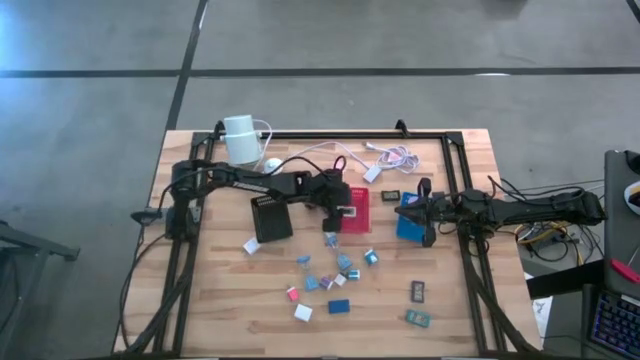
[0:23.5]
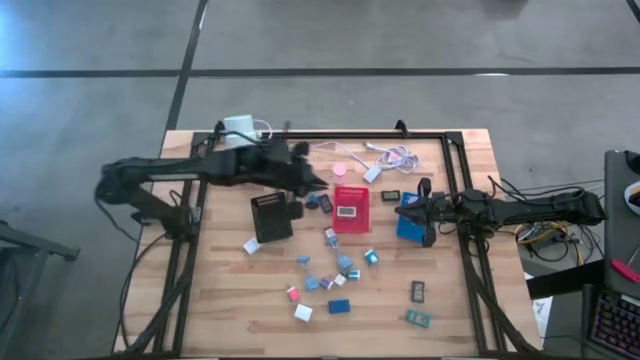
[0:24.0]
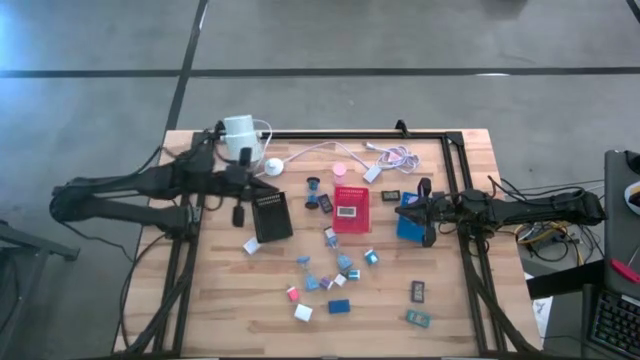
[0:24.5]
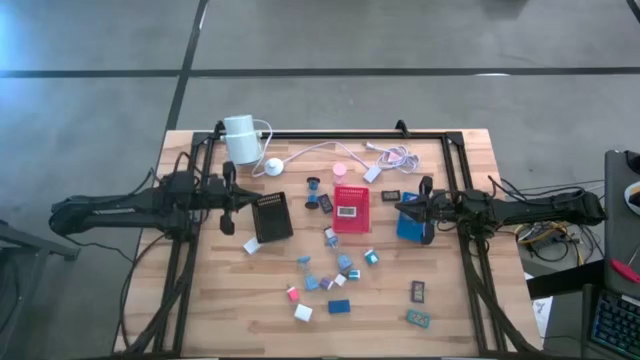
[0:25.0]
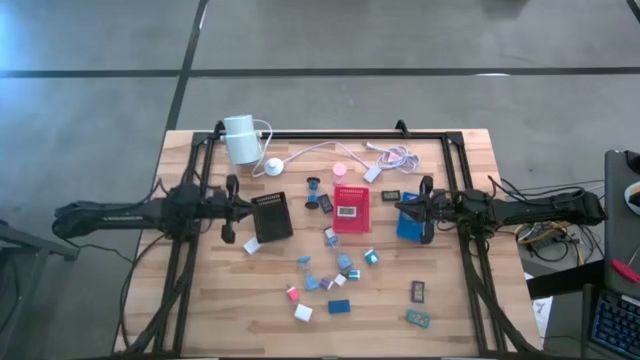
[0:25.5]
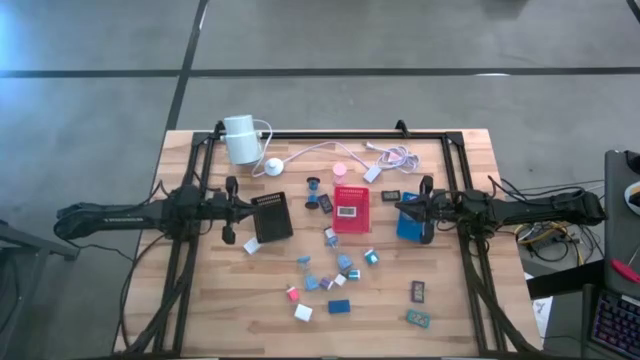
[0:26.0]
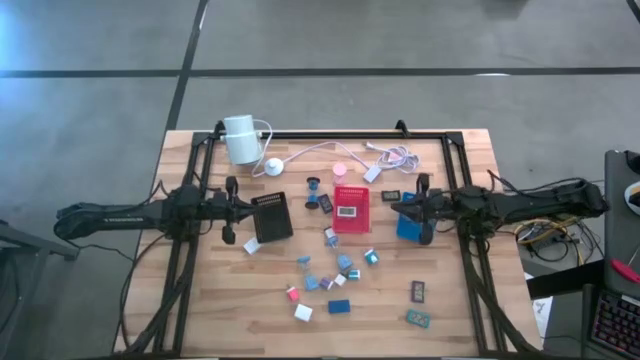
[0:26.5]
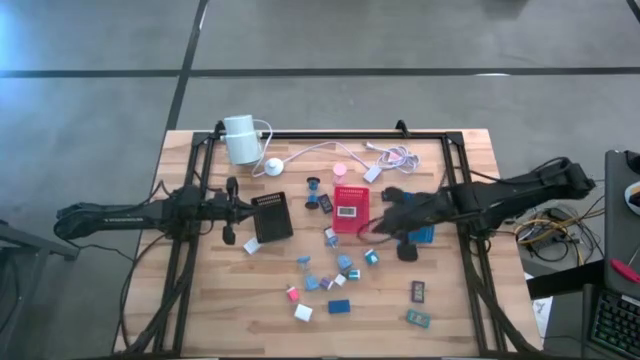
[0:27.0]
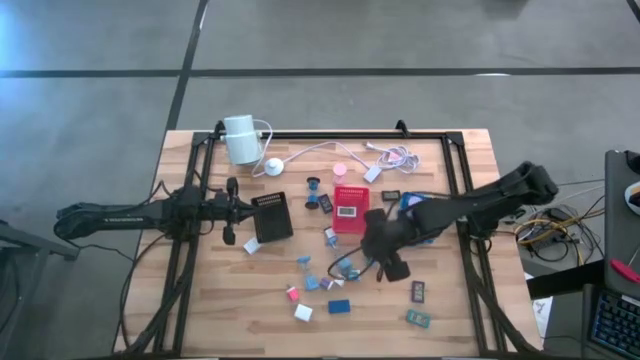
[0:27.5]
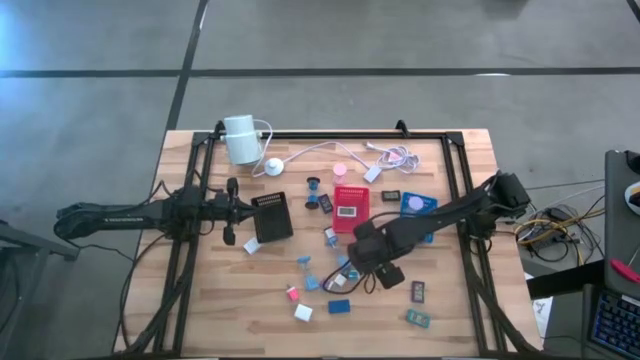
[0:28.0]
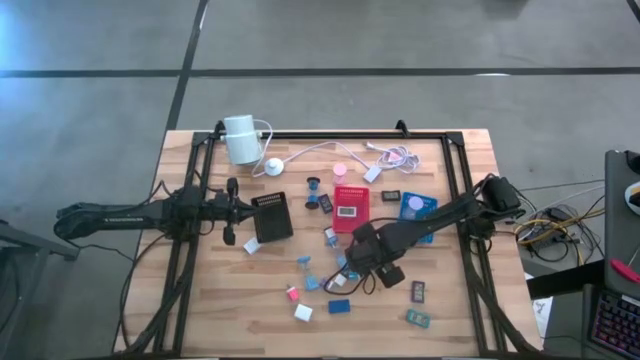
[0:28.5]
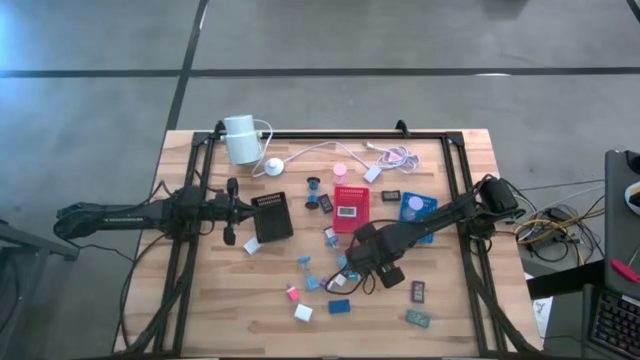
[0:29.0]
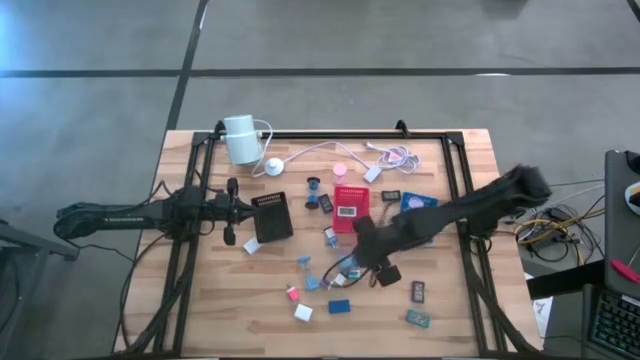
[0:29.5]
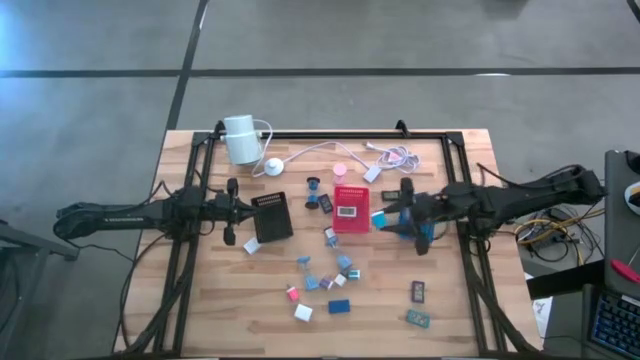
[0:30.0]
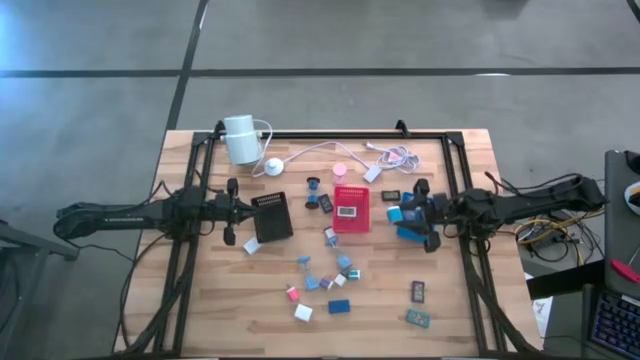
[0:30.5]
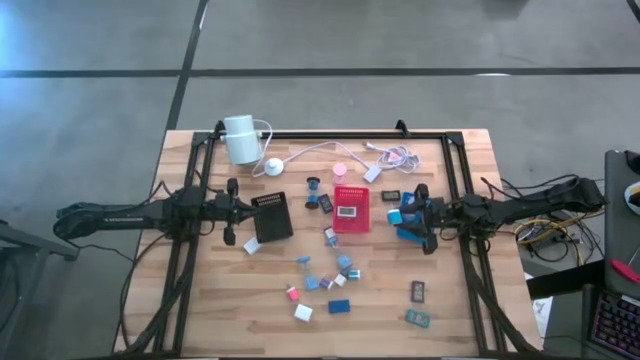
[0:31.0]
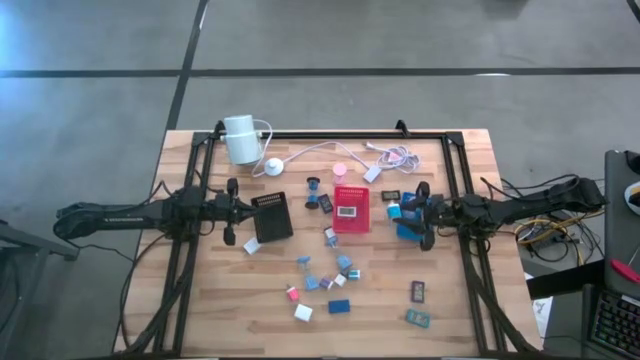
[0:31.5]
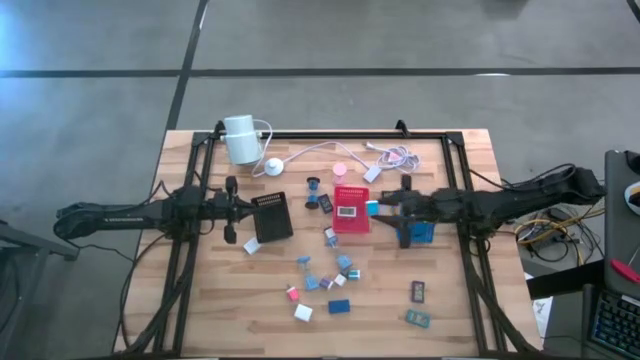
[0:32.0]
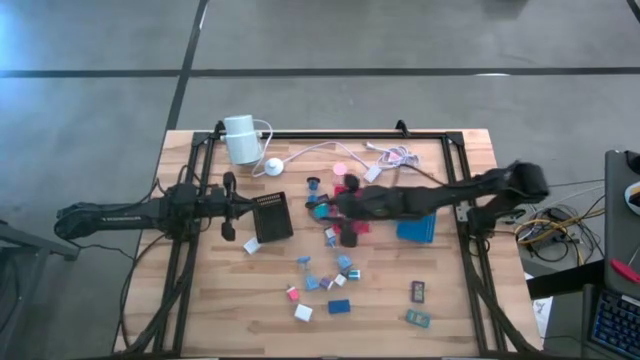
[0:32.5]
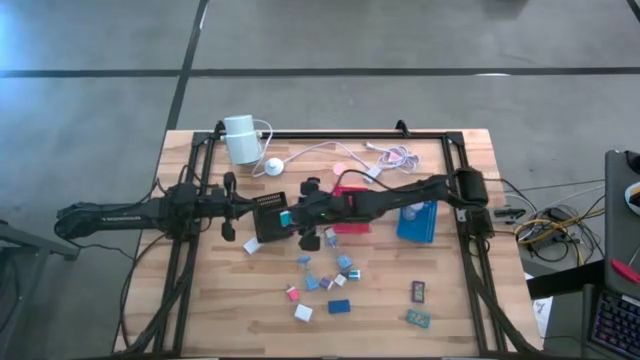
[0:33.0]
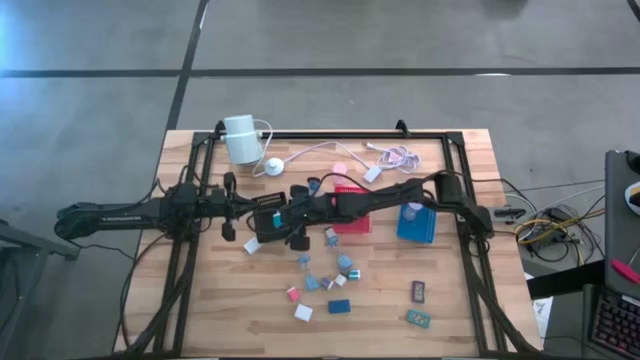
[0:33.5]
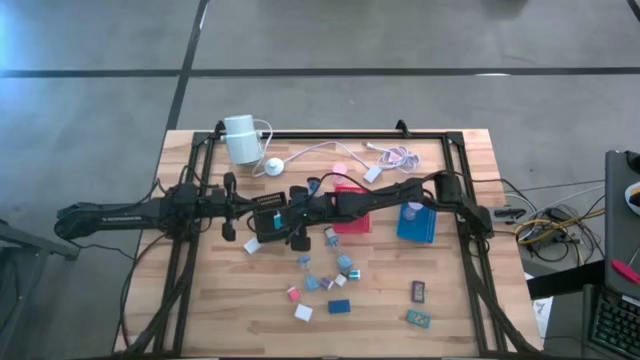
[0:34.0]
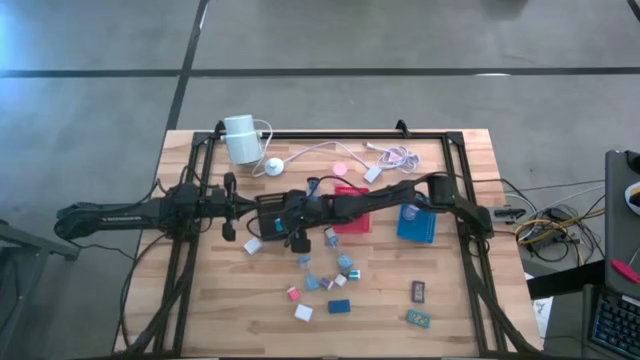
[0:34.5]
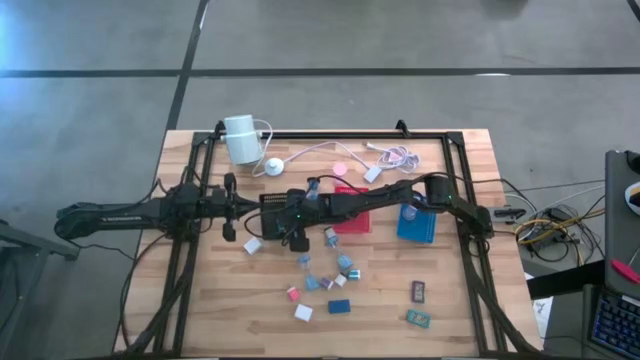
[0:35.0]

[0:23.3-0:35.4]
Task: Pick & Place Office items
Put the top blue charger charger adapter into the black bin

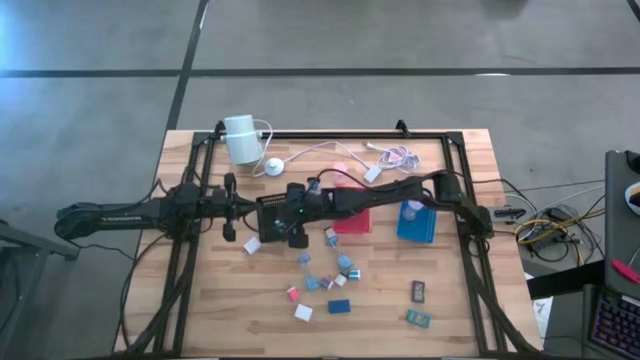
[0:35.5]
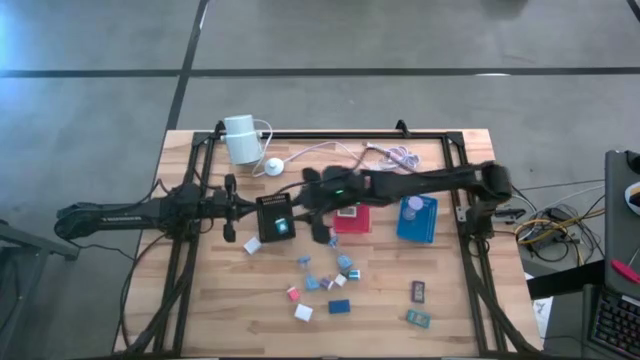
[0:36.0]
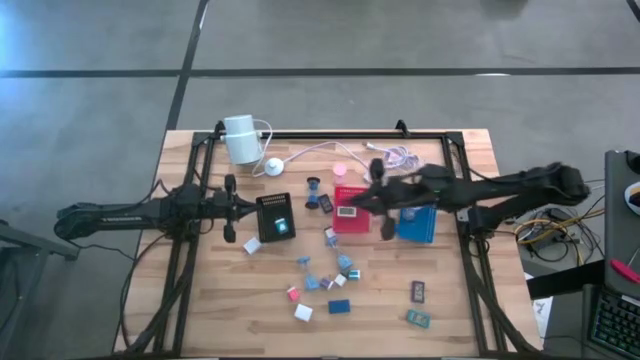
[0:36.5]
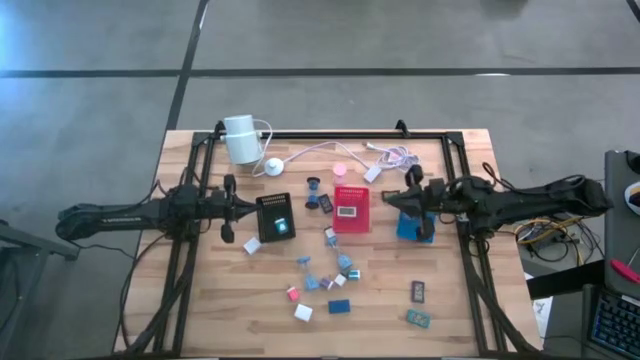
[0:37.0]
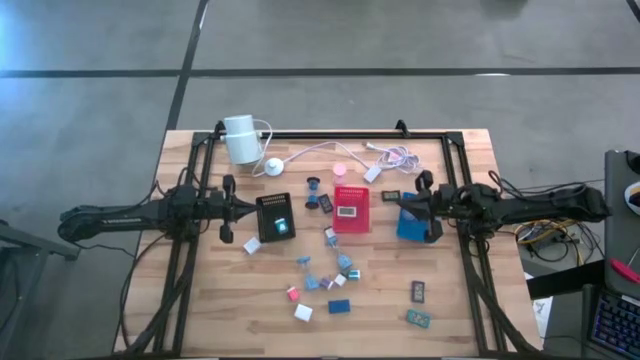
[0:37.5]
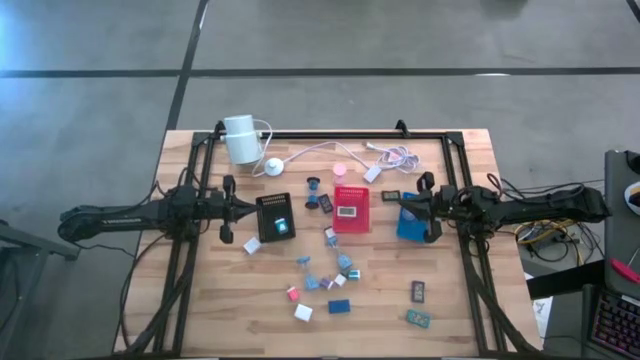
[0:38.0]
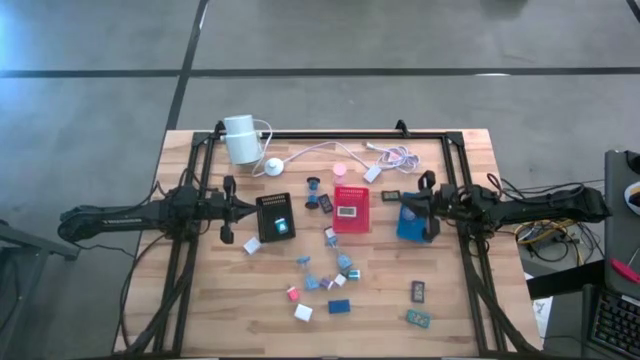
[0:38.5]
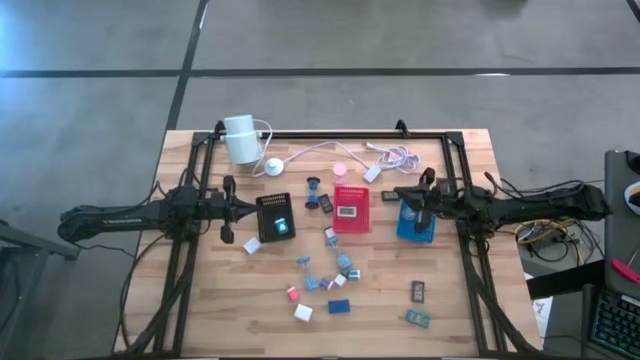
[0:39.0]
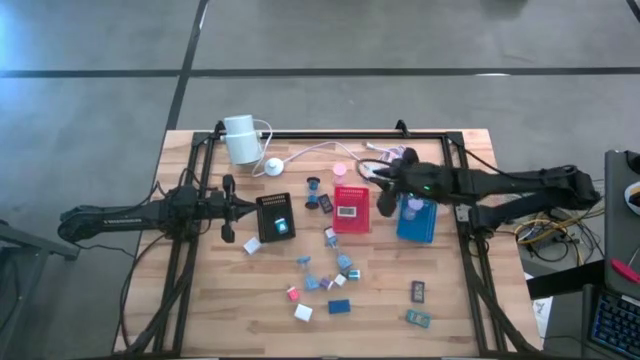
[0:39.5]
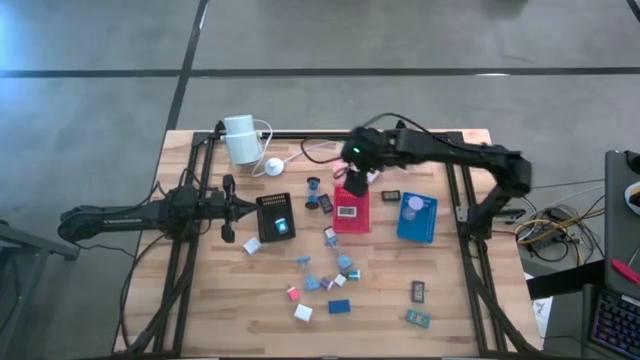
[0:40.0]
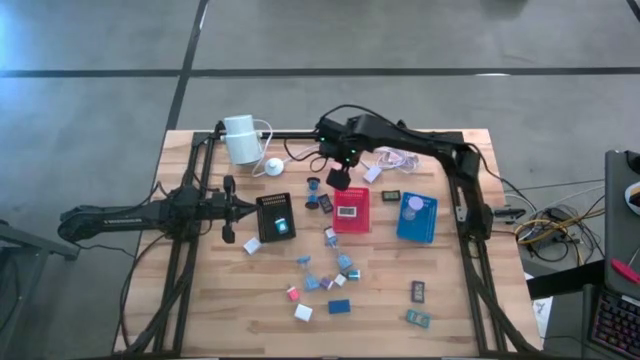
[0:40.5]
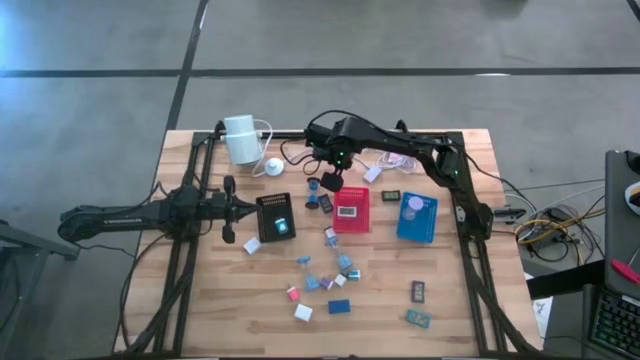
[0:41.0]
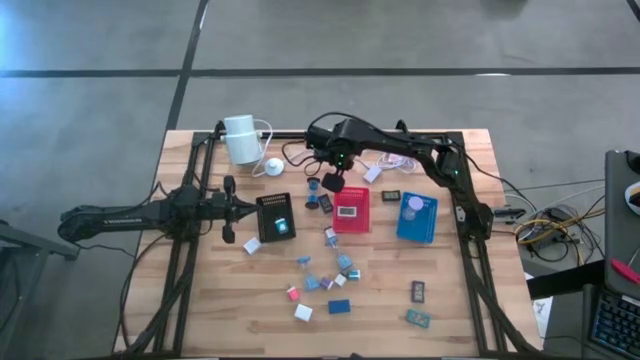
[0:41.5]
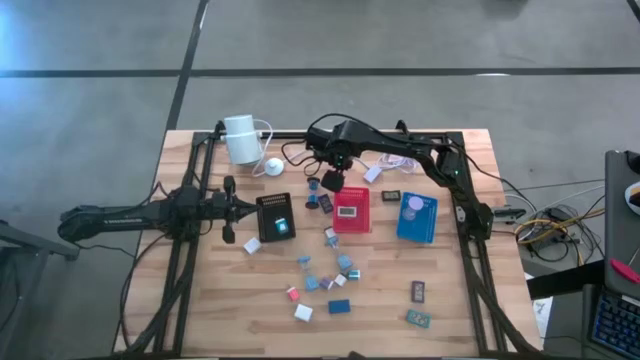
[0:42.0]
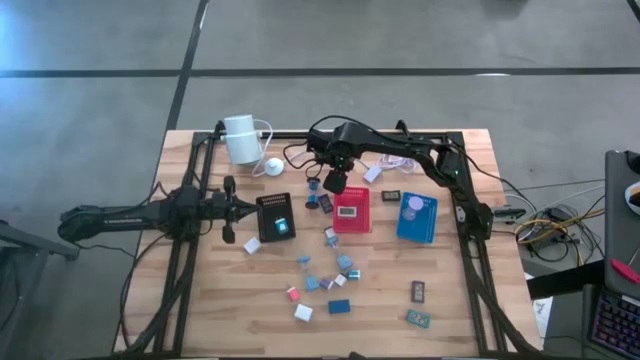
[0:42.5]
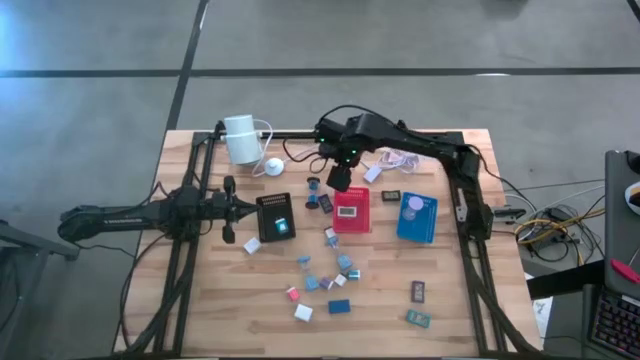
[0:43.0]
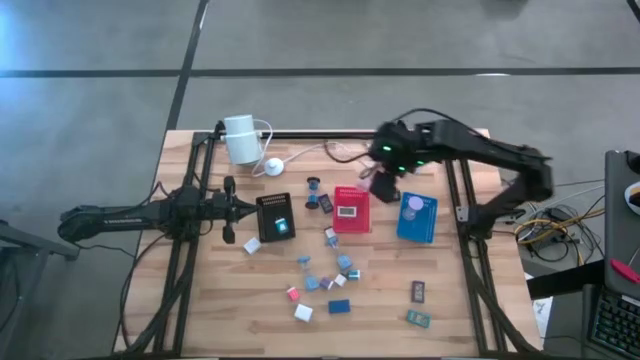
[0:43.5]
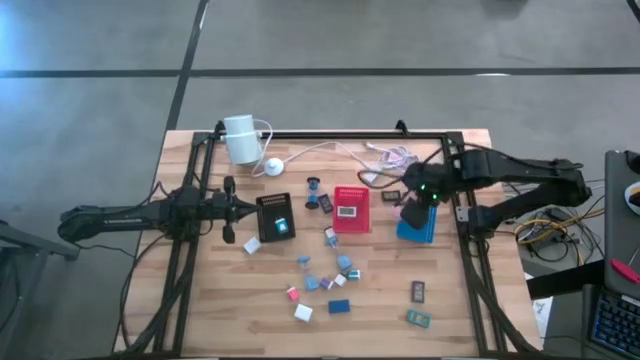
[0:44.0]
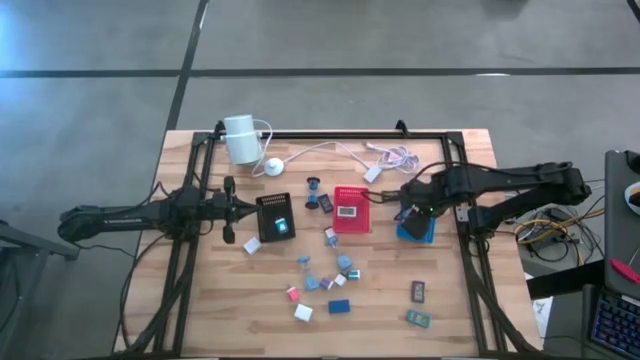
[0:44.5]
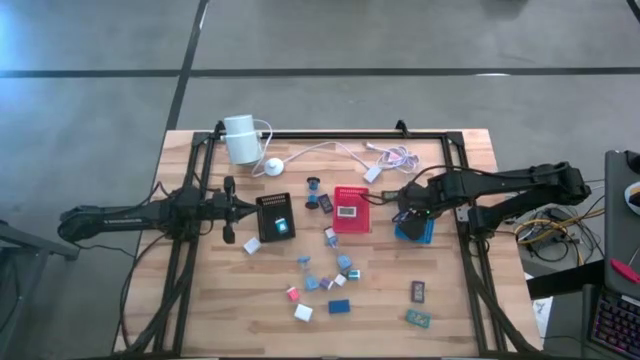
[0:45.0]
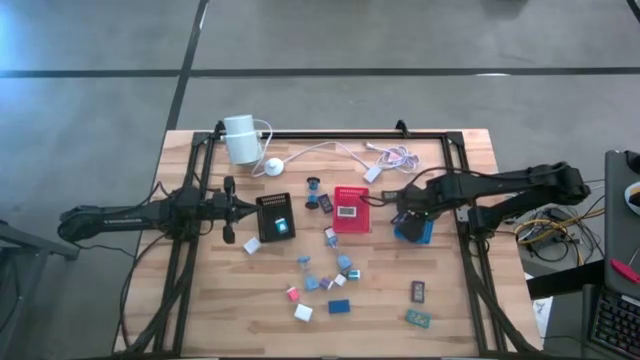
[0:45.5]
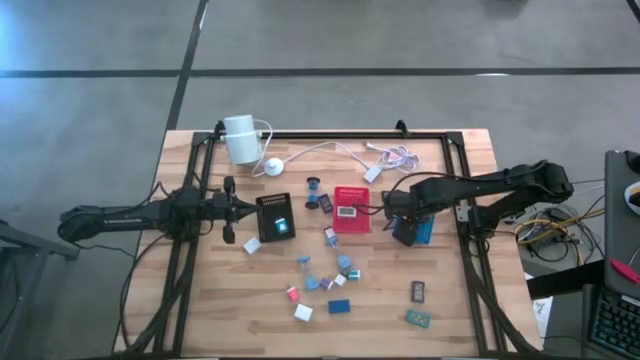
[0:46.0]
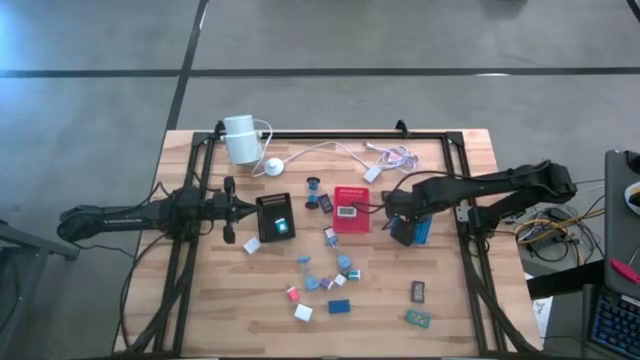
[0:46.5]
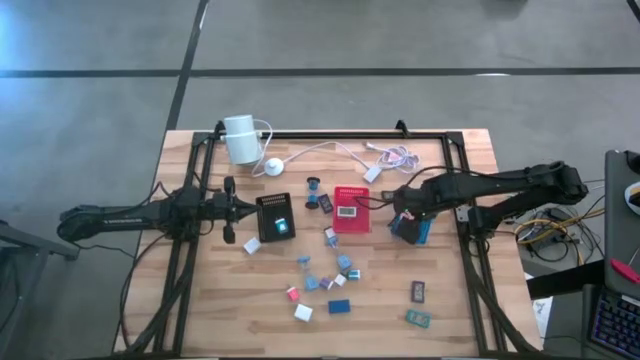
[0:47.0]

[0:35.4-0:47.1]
Put the pink hourglass into the blue bin
